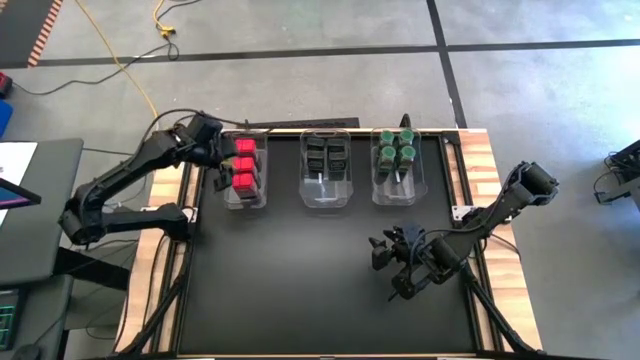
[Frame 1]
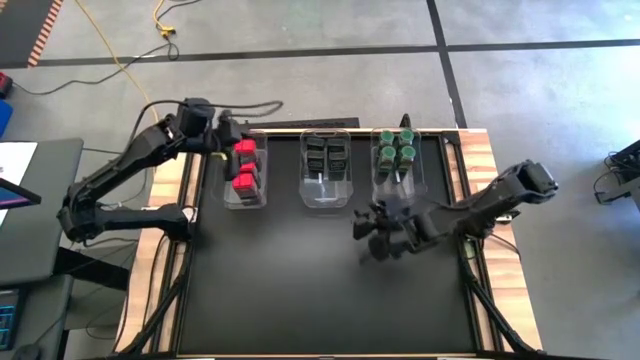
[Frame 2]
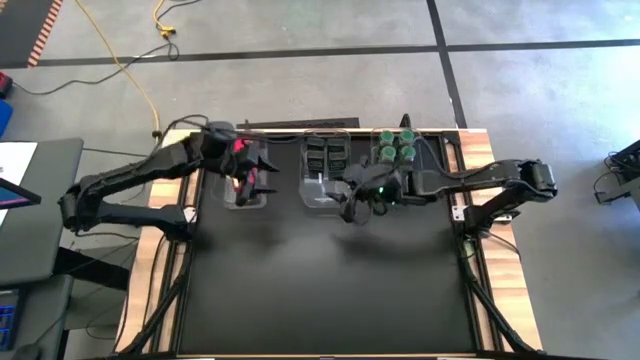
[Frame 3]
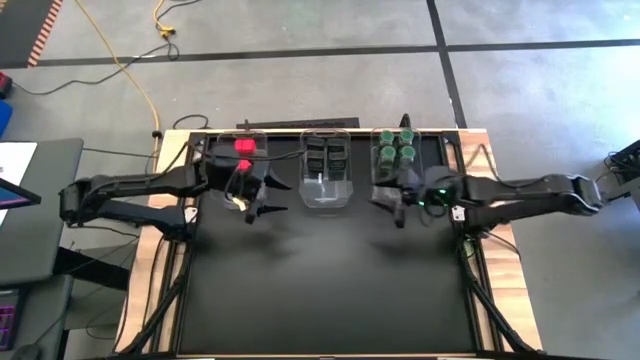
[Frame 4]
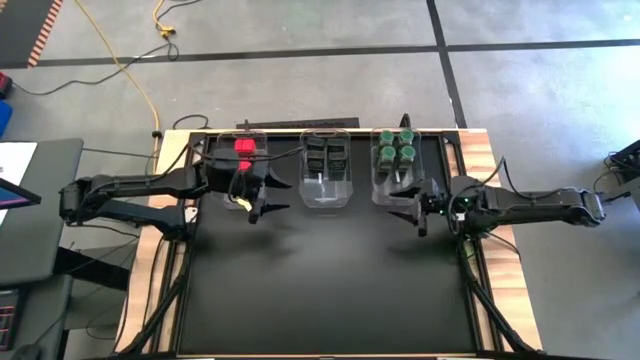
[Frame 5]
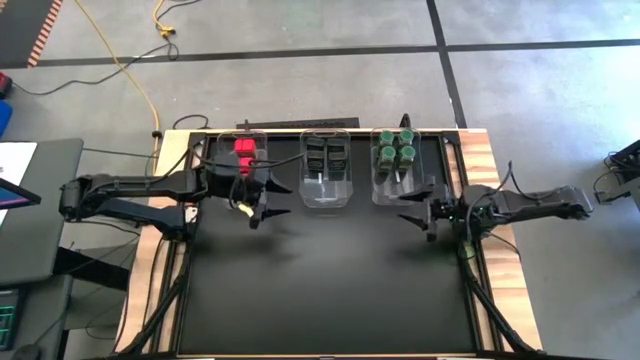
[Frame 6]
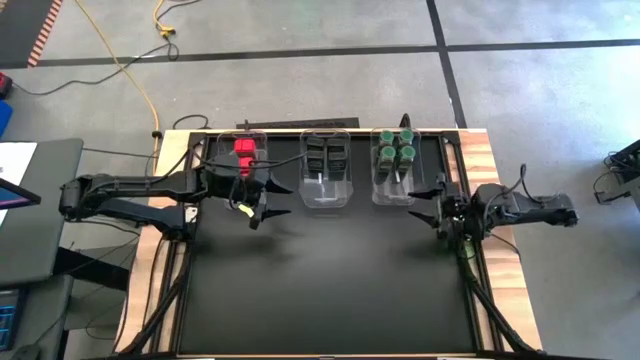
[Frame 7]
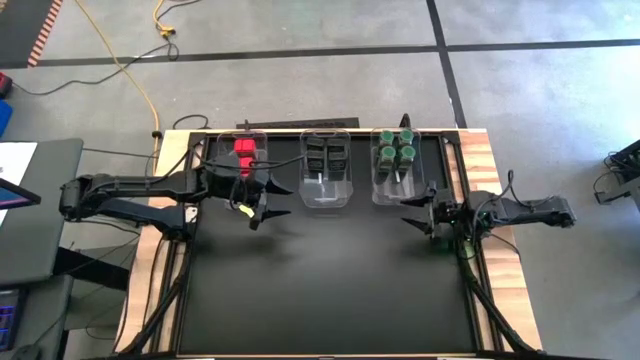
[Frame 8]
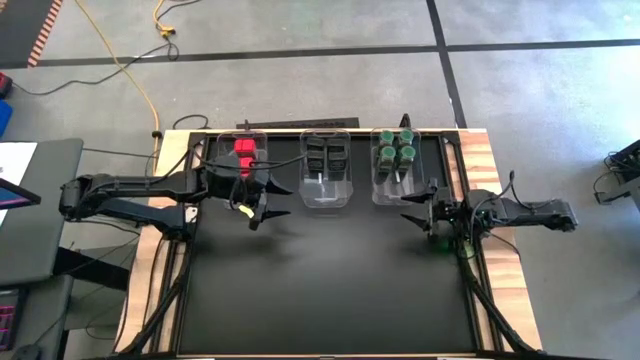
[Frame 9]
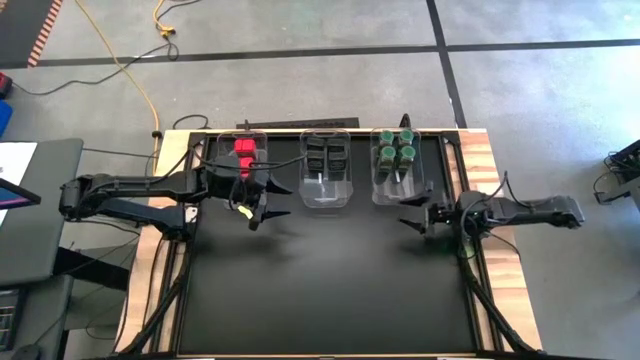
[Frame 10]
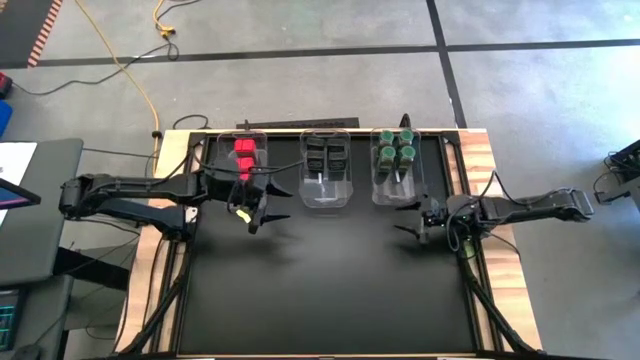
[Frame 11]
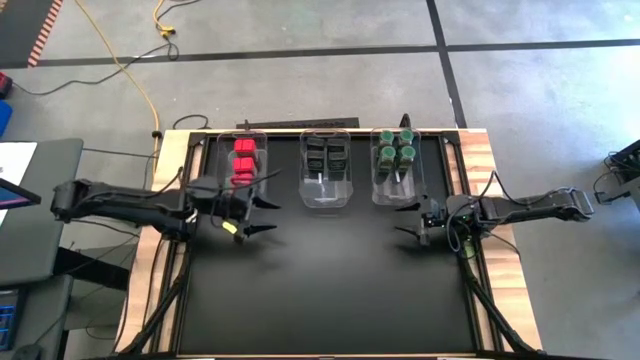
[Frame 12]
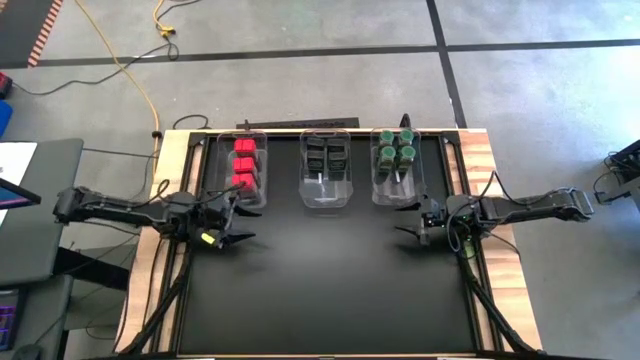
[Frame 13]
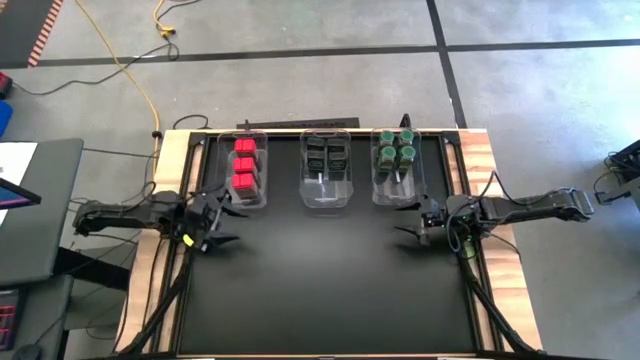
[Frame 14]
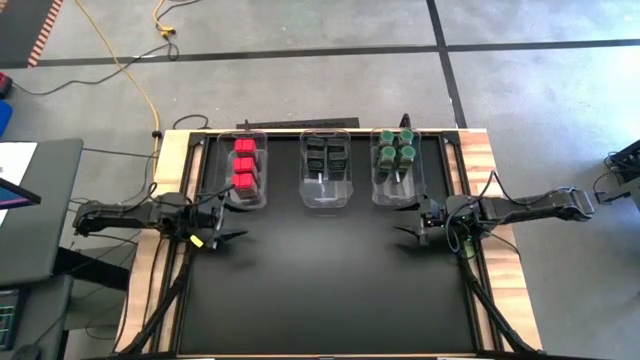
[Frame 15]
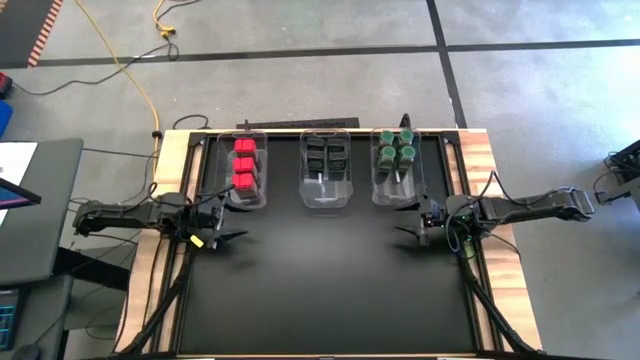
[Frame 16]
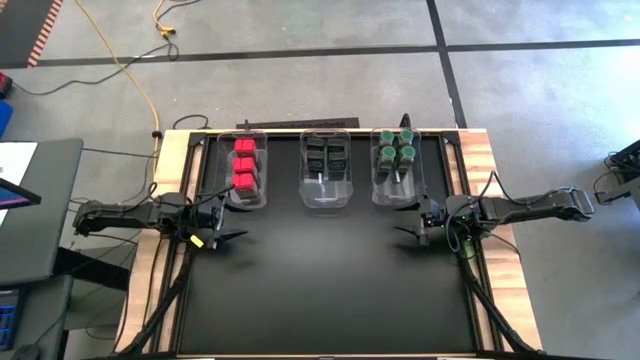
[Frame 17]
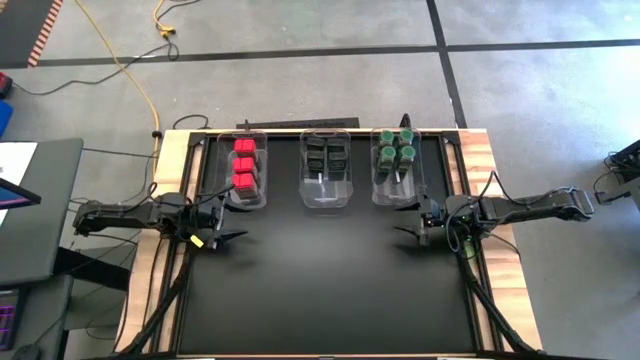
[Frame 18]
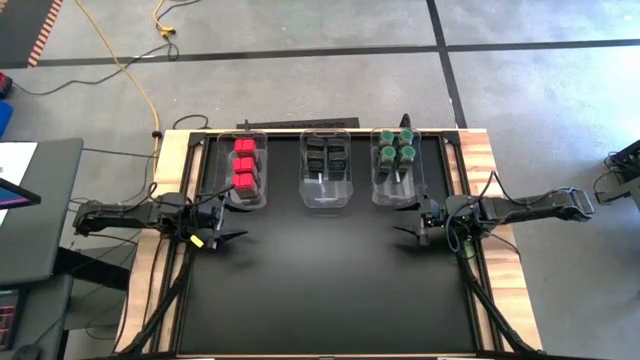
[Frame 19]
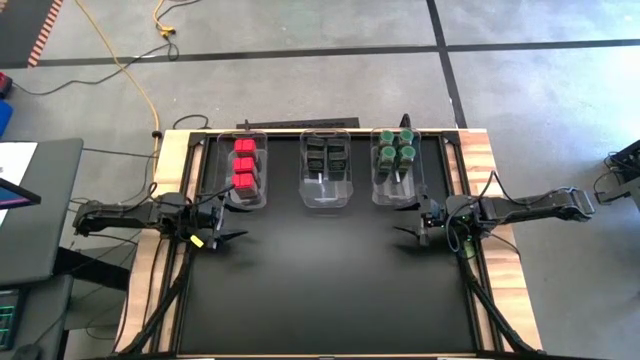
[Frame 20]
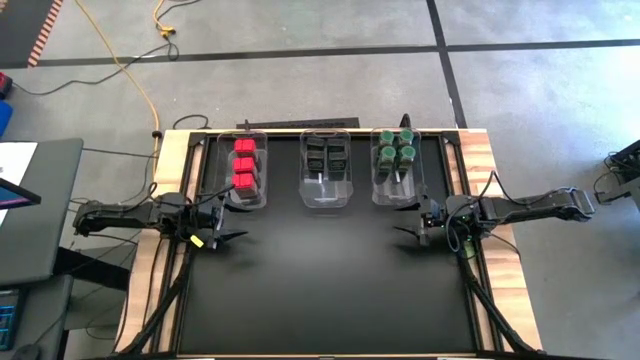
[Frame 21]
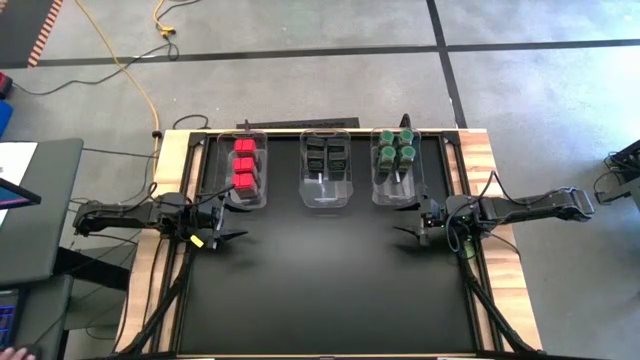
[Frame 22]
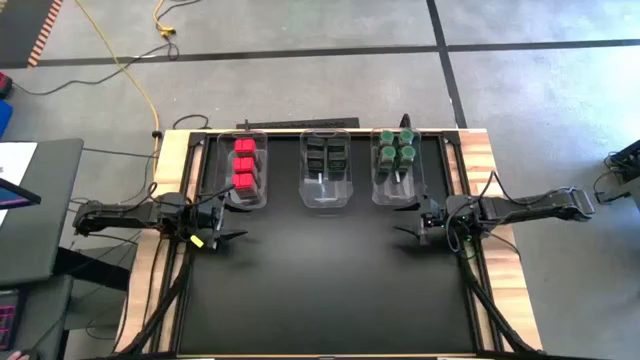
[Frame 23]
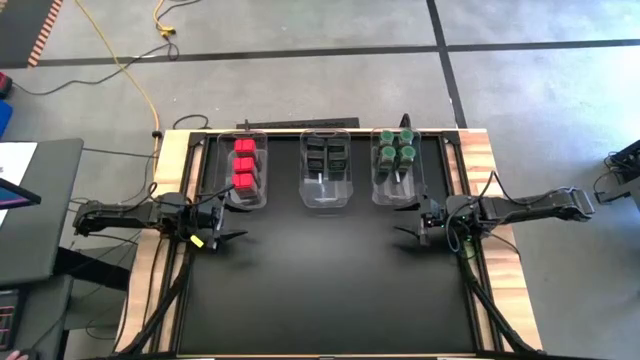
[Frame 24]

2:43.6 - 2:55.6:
Task: Sort spices by type
Return to Home Position

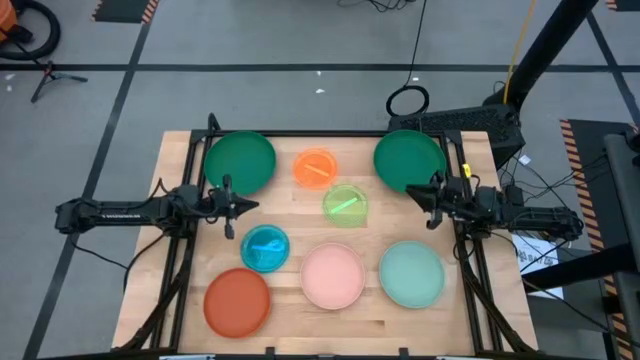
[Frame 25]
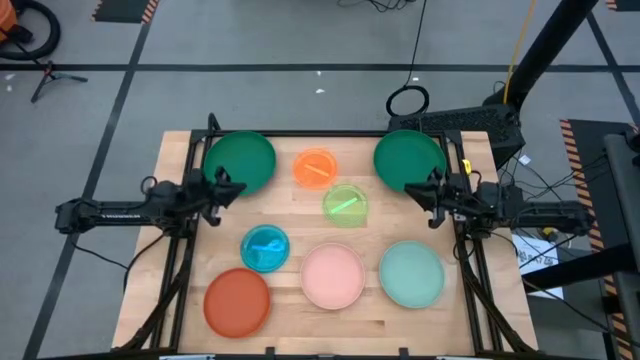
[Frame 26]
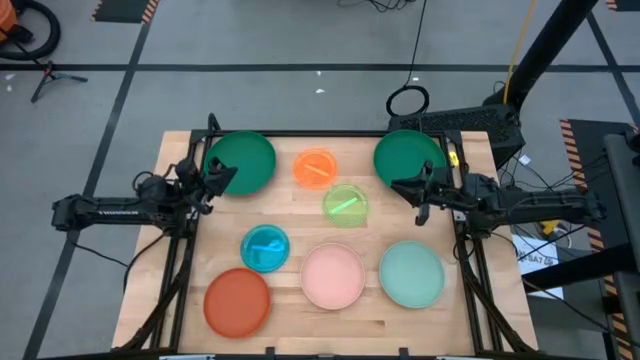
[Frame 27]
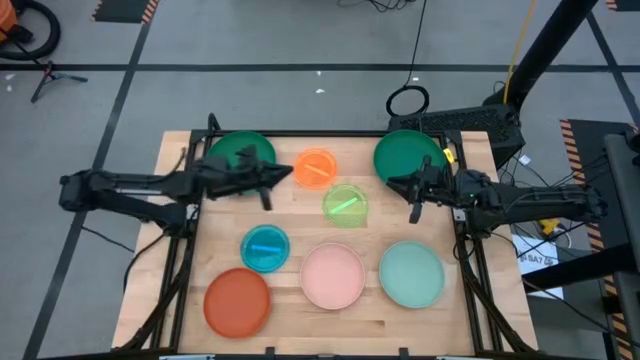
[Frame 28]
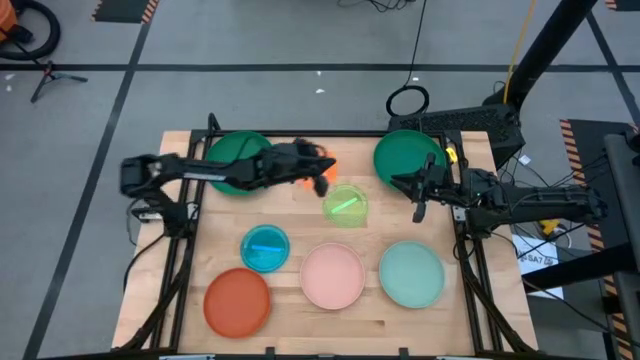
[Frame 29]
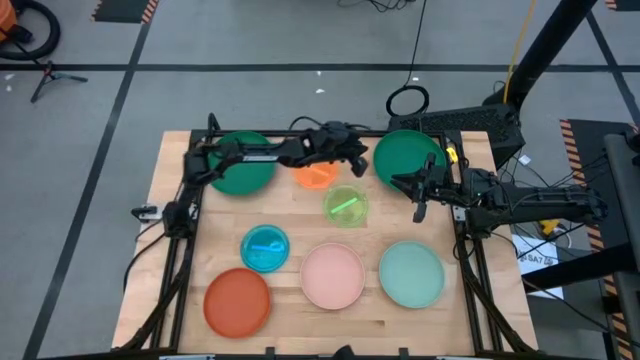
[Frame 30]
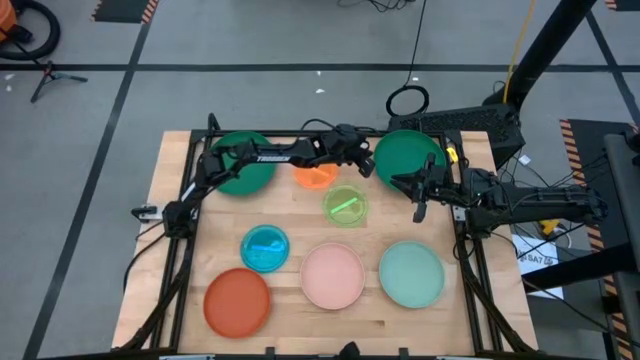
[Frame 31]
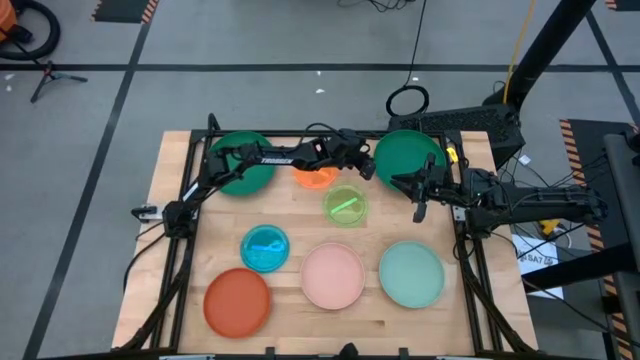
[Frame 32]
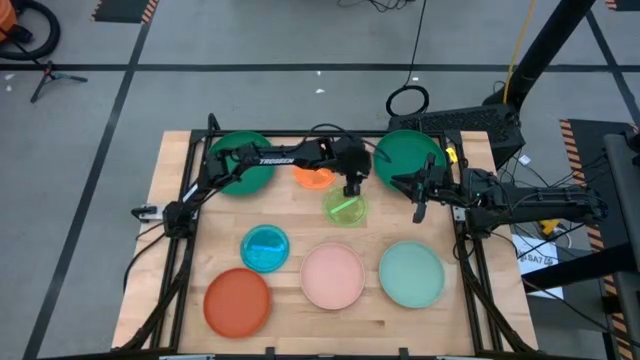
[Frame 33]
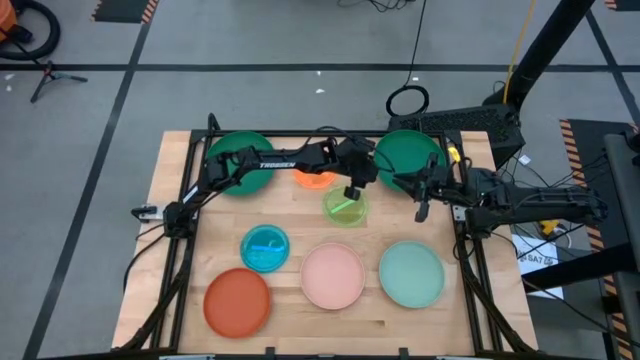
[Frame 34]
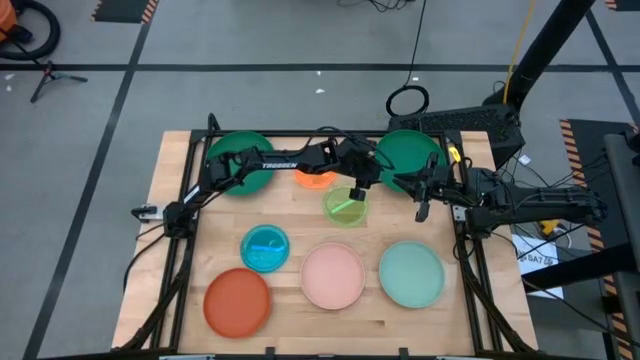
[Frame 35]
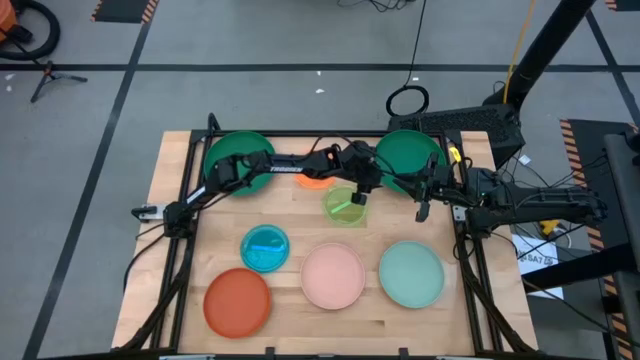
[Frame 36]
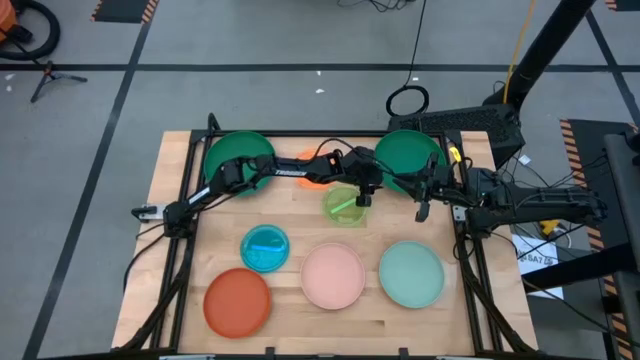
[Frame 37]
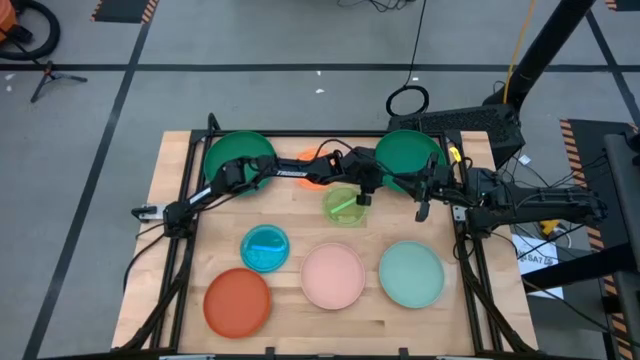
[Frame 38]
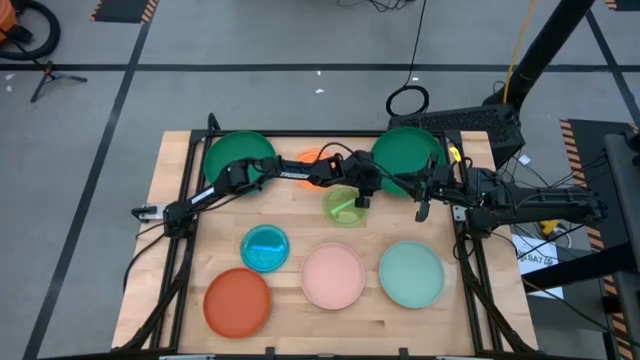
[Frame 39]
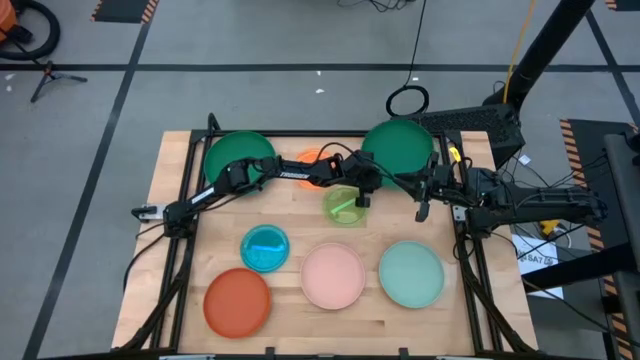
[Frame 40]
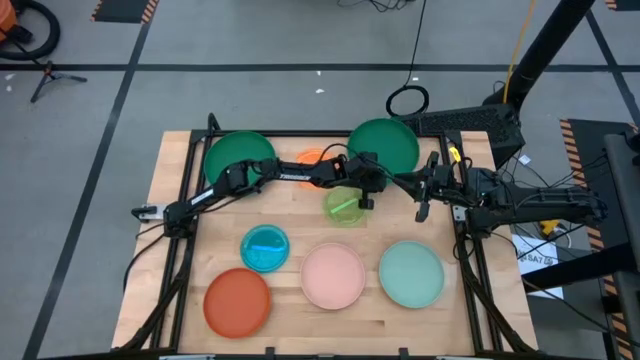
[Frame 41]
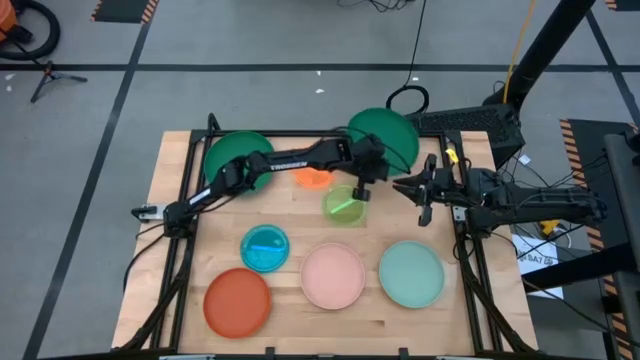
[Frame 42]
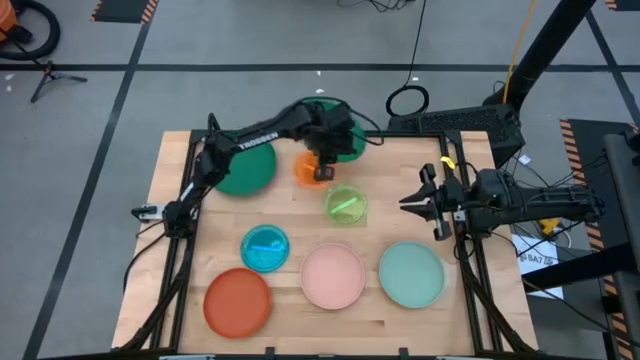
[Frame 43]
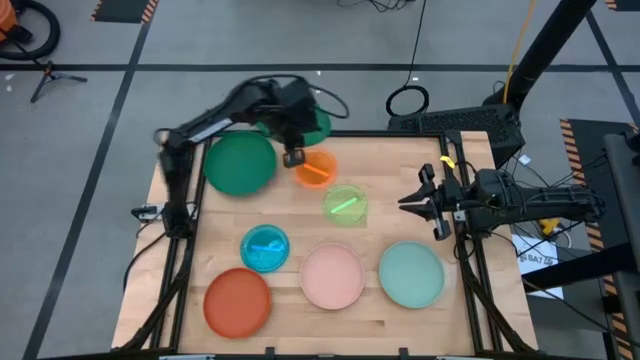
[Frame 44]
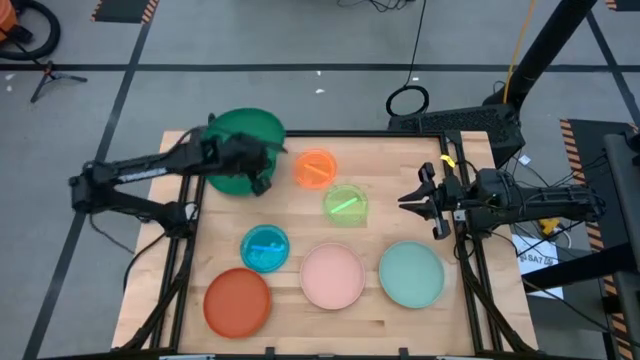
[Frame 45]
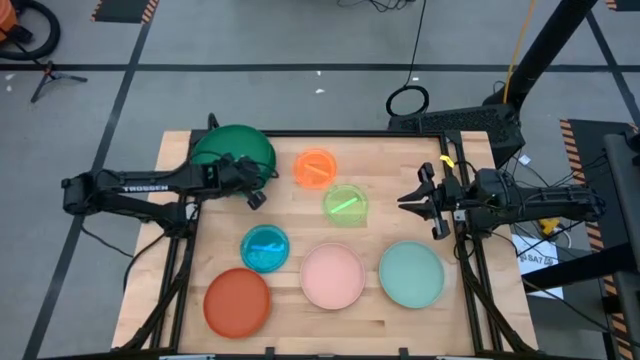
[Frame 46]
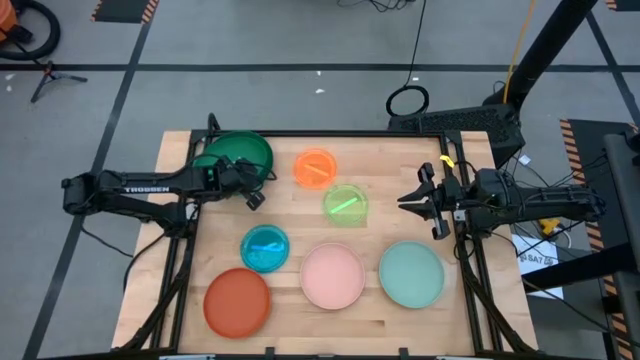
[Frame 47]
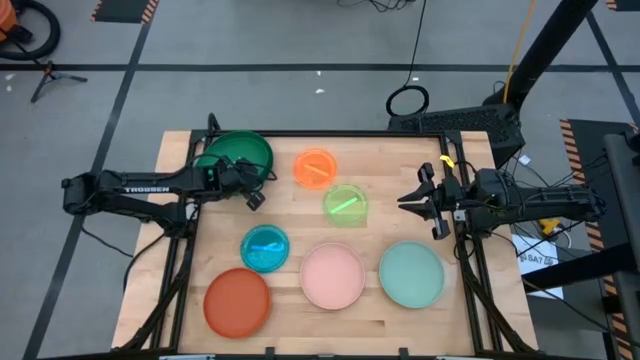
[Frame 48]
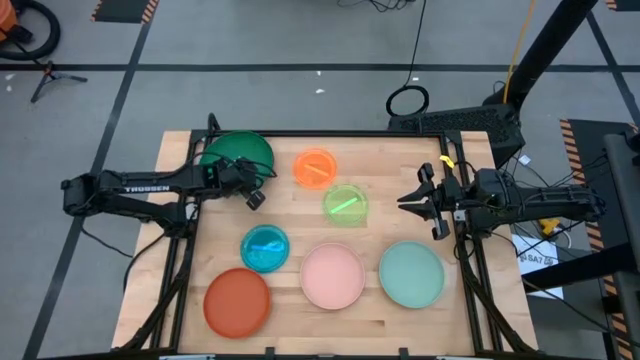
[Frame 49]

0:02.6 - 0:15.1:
Task: Stack plastic plates
Stack the right green plate on top of the left green plate
